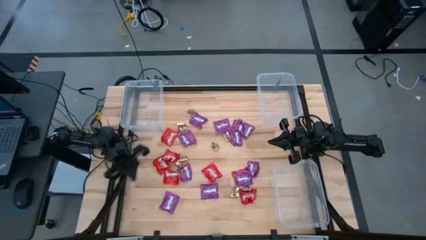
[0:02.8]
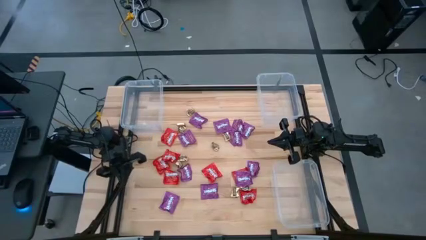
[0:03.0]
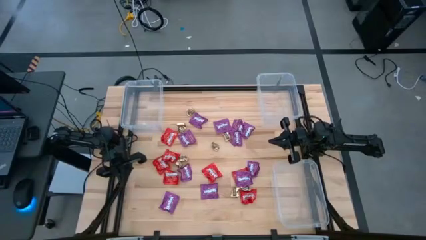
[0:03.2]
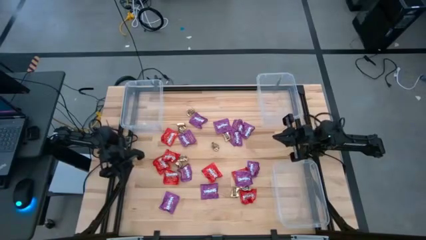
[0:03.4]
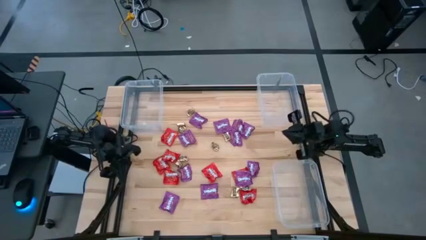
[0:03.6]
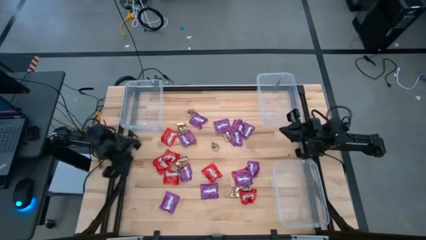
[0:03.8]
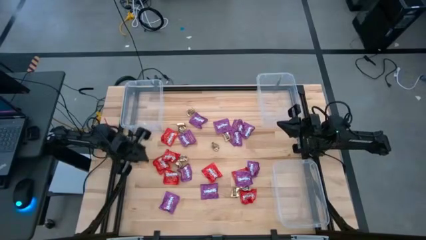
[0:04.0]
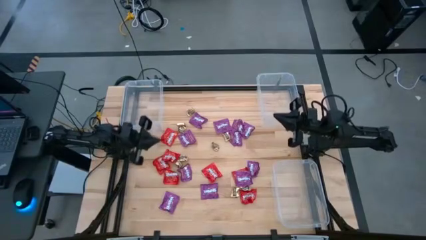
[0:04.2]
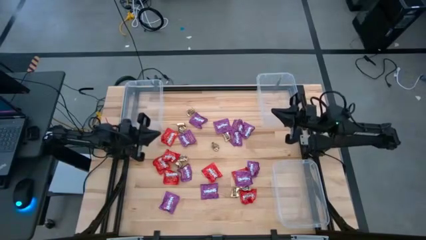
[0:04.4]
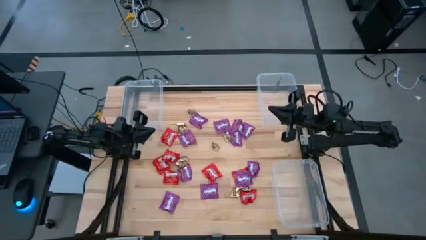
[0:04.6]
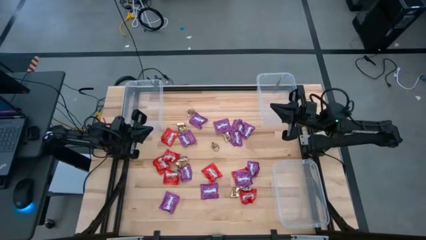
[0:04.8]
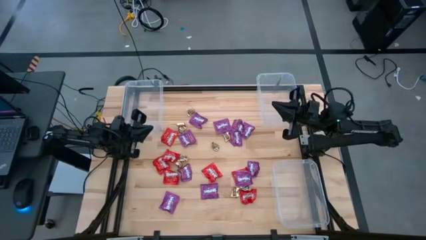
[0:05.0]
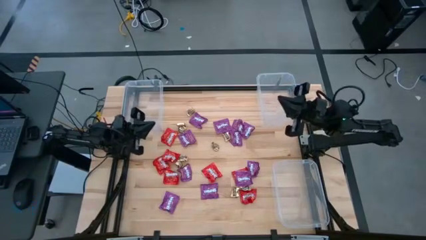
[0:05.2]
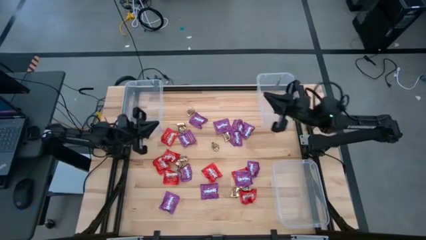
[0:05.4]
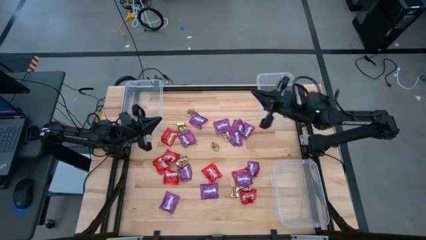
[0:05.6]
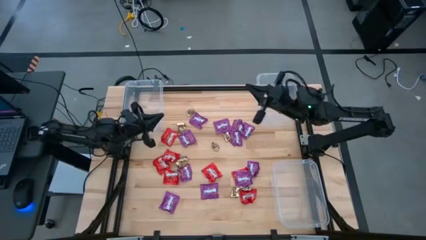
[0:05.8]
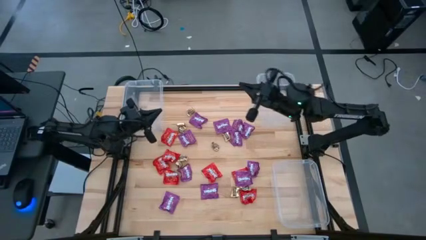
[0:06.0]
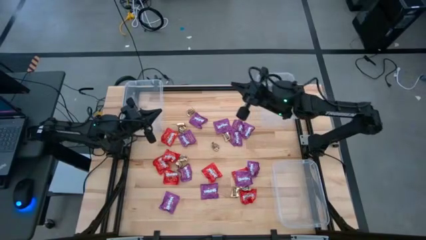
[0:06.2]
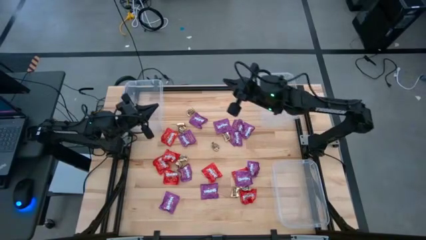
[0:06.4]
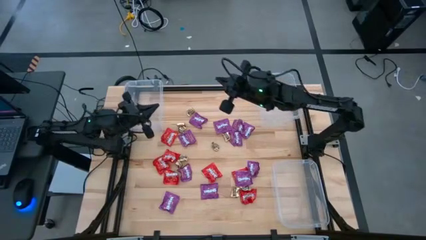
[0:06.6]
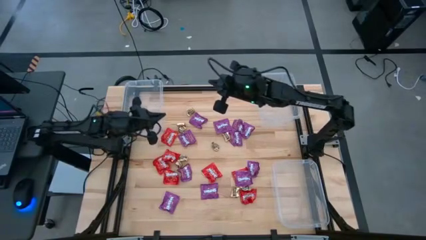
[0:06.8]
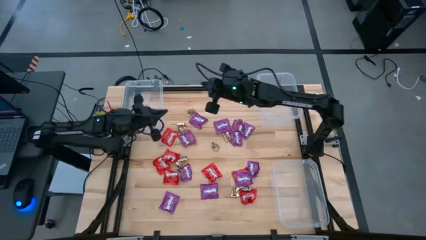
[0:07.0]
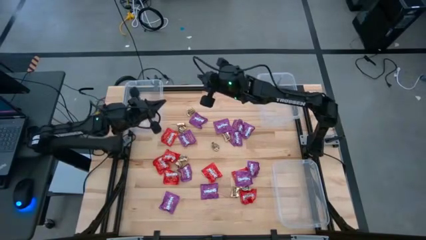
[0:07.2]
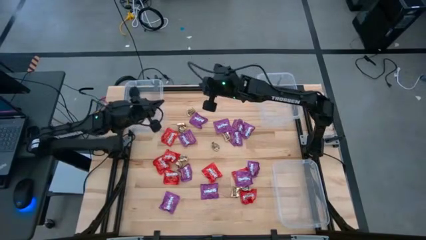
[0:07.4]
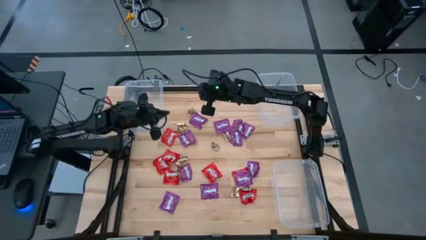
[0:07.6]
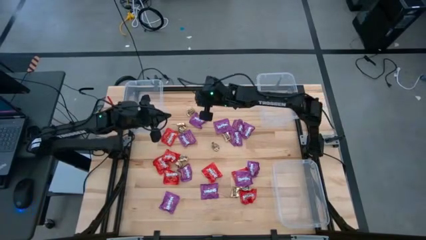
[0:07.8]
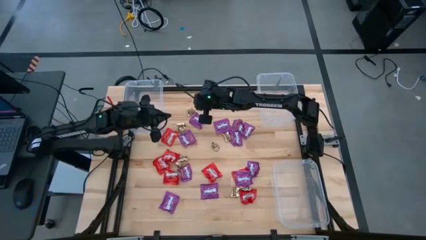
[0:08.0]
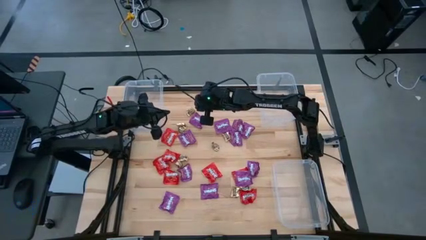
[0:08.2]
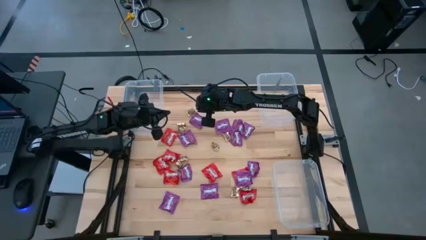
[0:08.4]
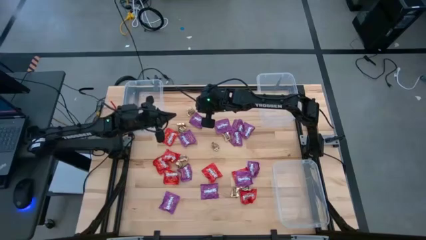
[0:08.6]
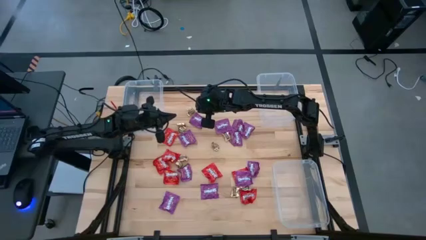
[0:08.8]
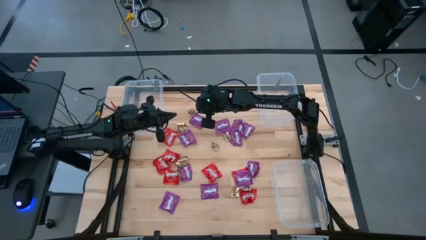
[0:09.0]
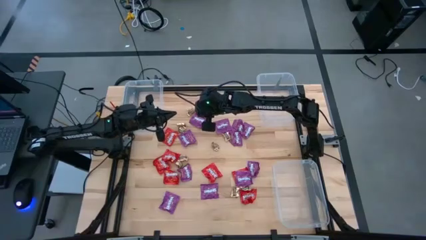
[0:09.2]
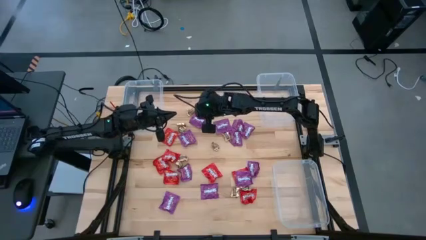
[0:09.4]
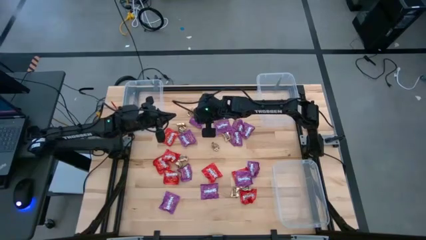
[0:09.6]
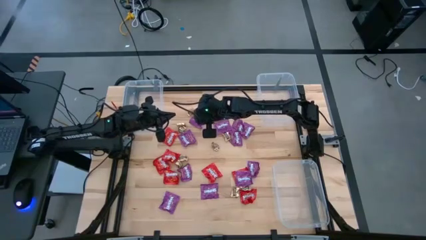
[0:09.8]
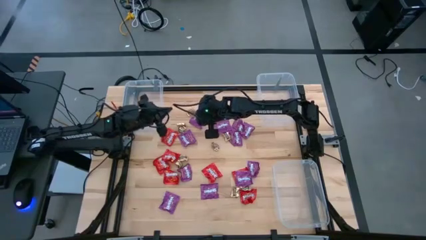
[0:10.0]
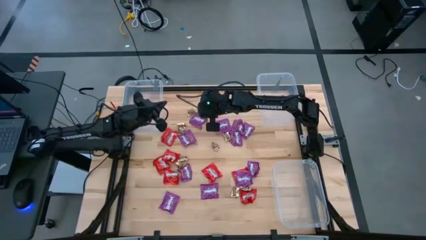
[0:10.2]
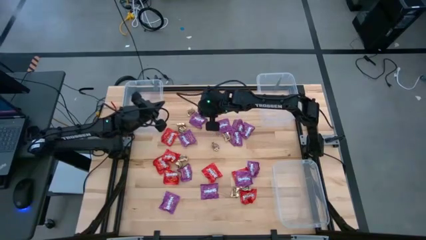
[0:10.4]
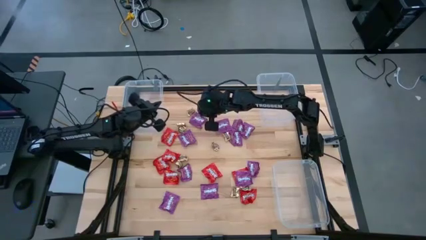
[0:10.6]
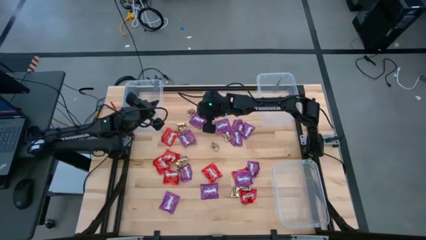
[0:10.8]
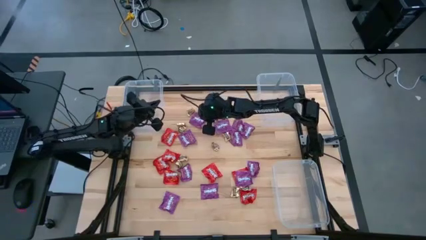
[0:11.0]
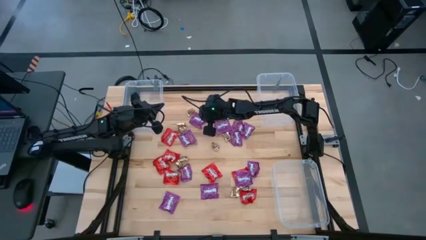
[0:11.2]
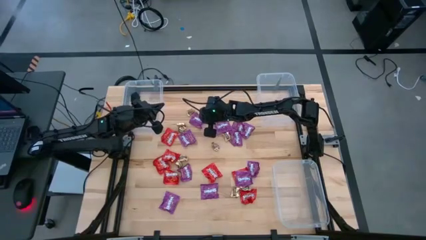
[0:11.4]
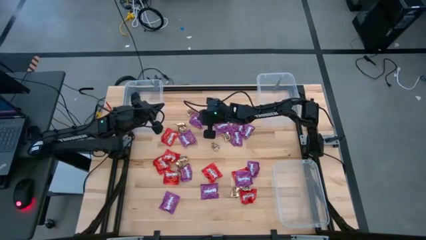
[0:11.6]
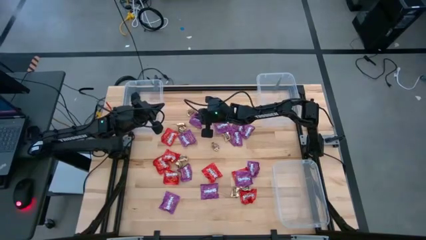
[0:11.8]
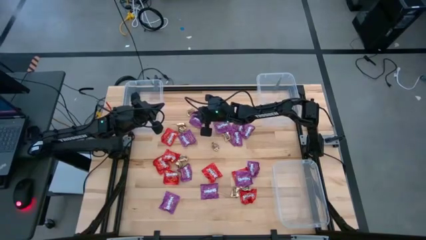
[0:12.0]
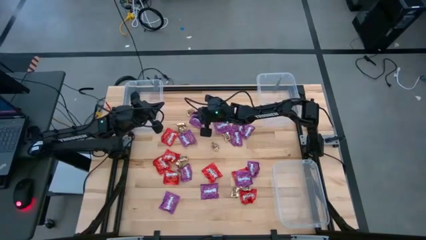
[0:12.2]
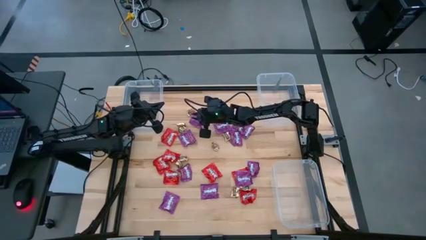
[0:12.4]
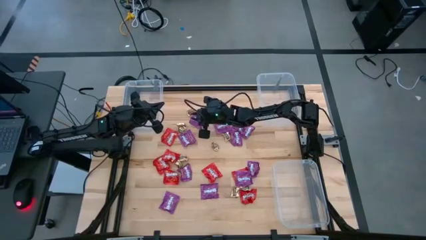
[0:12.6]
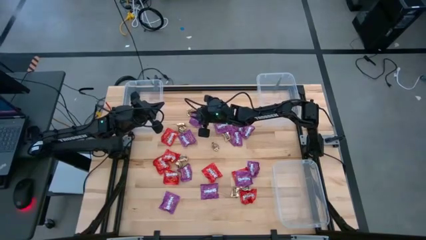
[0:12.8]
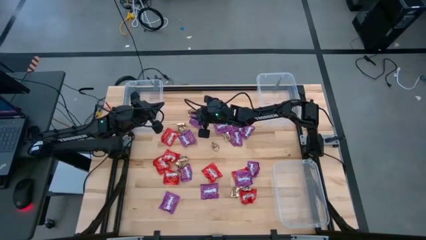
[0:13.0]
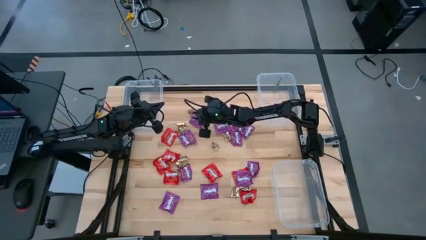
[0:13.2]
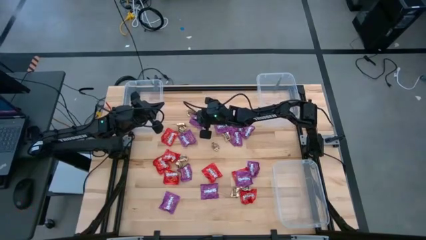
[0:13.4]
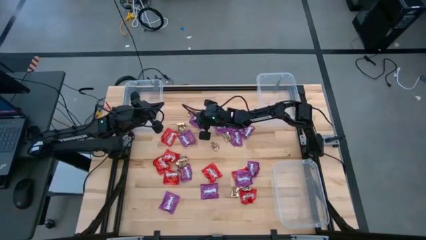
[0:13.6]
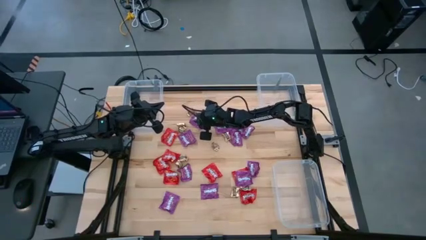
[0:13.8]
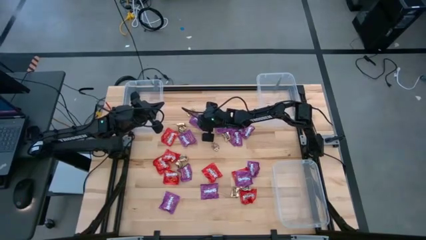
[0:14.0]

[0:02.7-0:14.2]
Task: Sort candy
Put the purple candy into the top right transparent bin
